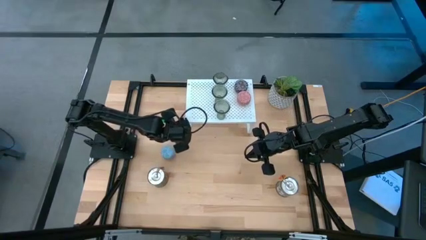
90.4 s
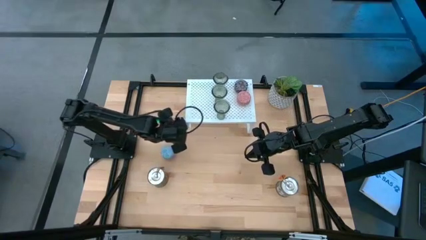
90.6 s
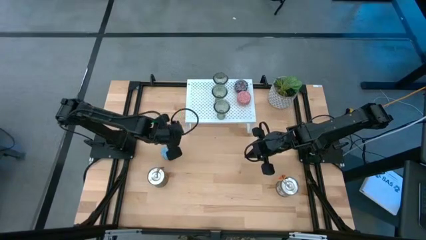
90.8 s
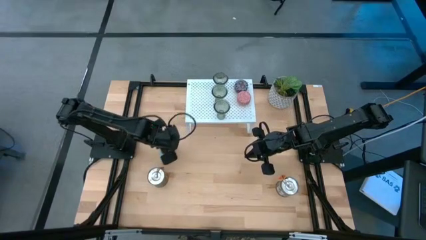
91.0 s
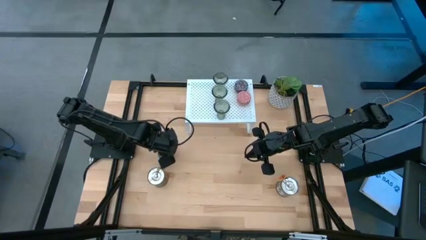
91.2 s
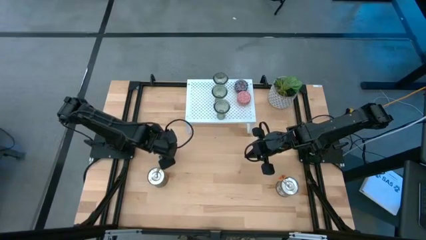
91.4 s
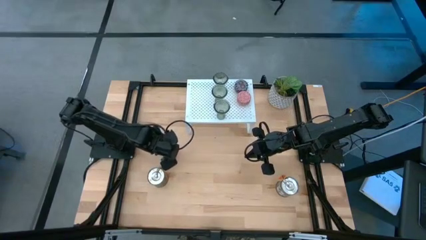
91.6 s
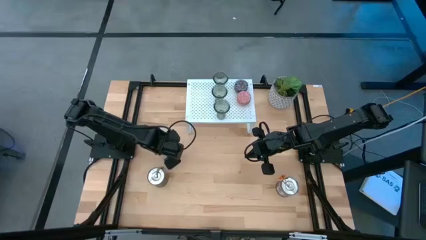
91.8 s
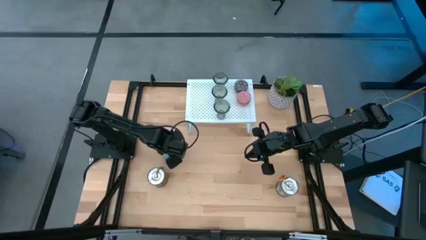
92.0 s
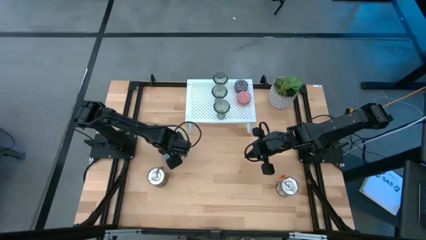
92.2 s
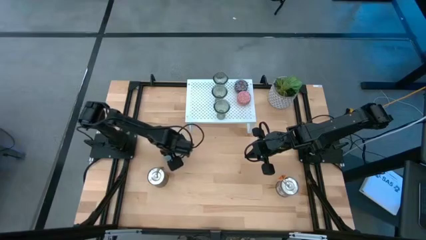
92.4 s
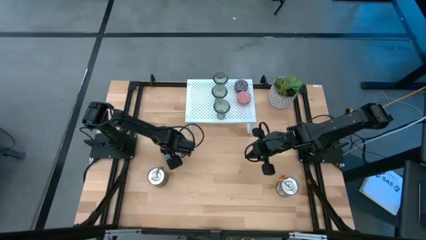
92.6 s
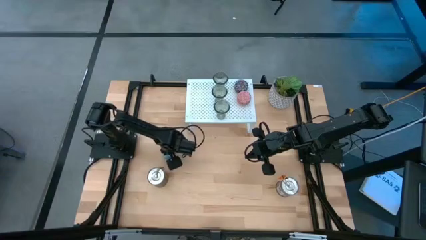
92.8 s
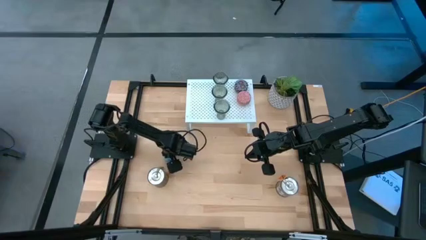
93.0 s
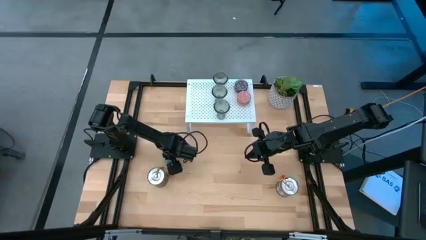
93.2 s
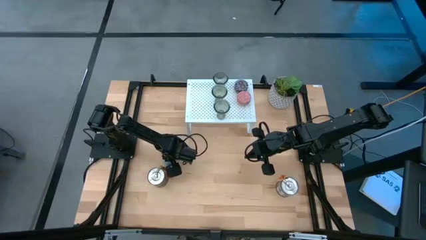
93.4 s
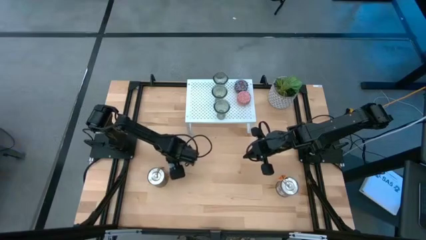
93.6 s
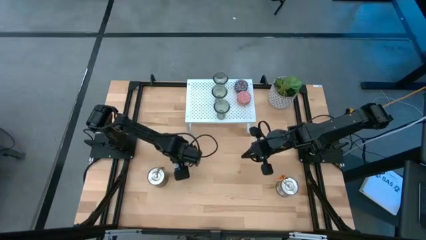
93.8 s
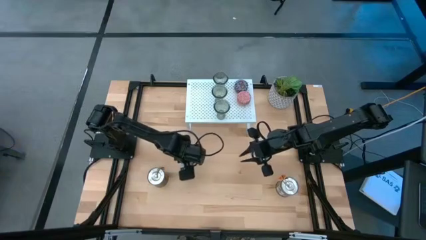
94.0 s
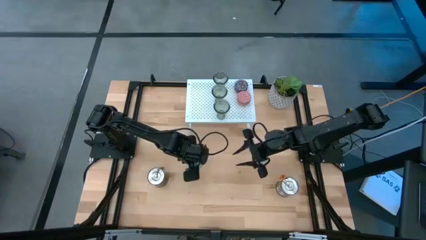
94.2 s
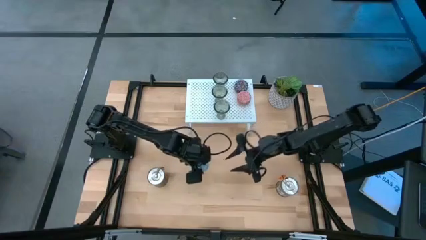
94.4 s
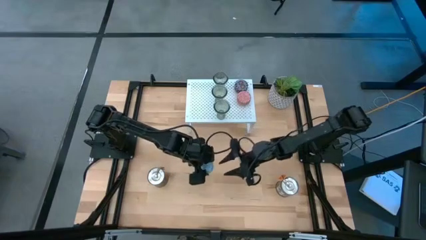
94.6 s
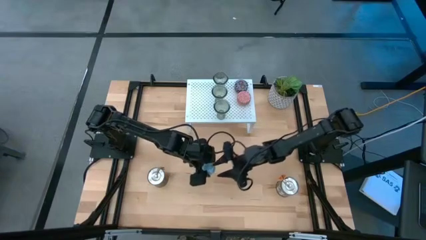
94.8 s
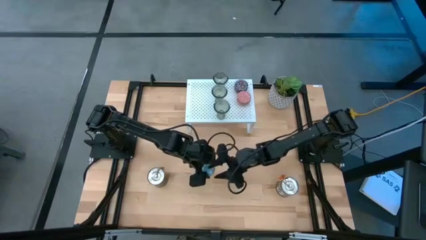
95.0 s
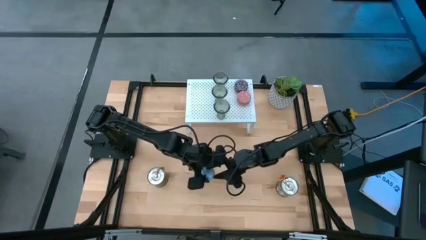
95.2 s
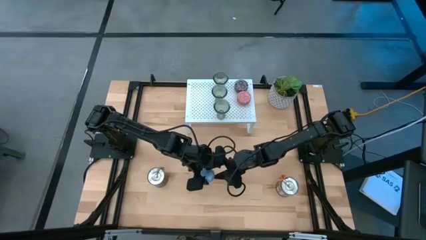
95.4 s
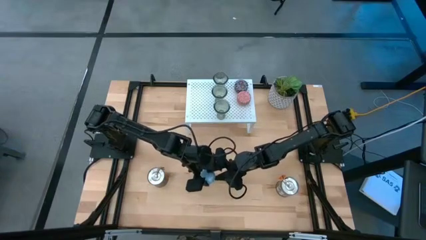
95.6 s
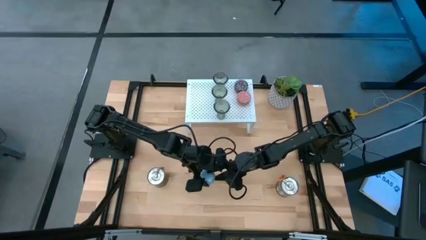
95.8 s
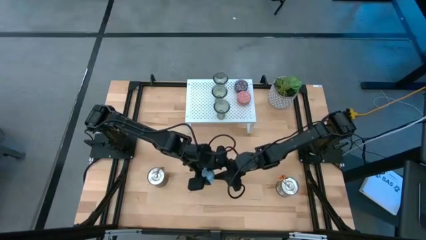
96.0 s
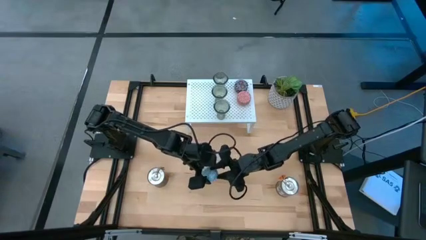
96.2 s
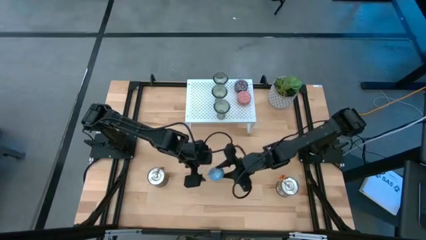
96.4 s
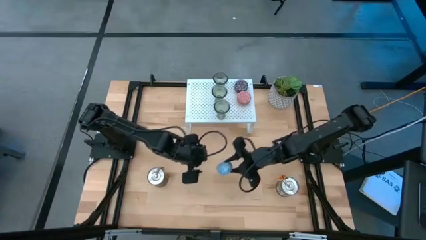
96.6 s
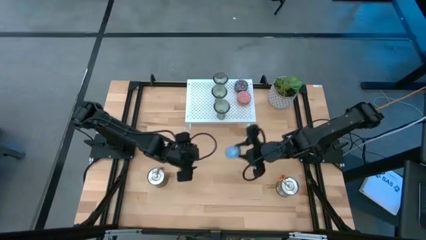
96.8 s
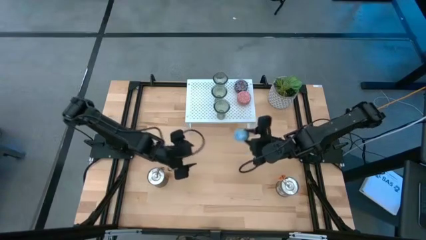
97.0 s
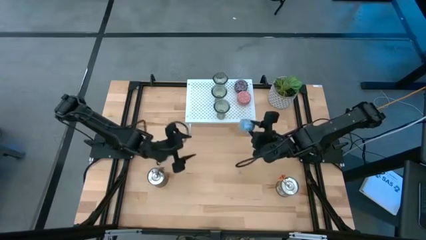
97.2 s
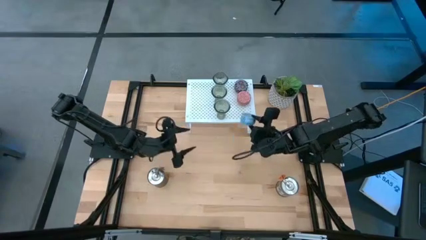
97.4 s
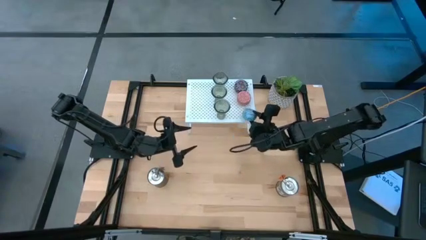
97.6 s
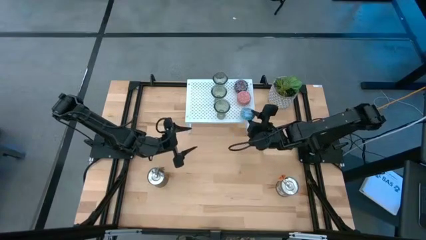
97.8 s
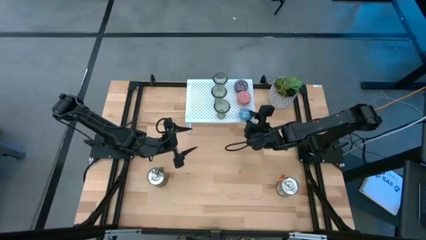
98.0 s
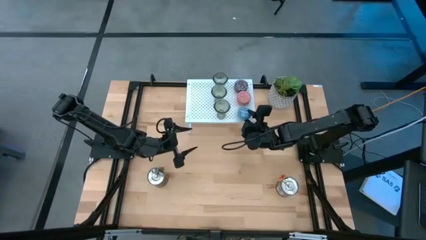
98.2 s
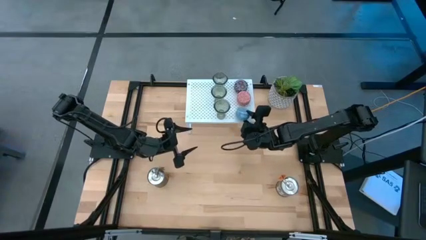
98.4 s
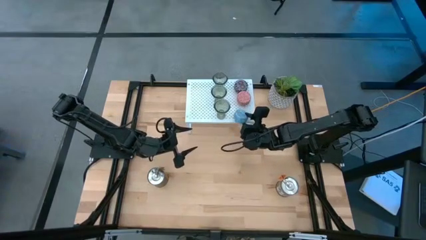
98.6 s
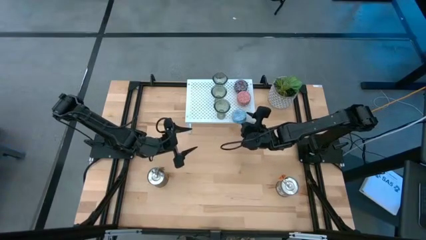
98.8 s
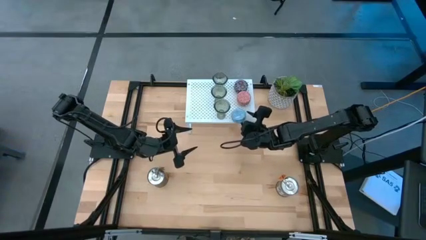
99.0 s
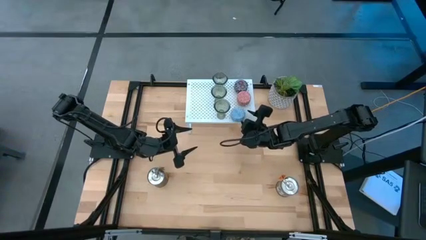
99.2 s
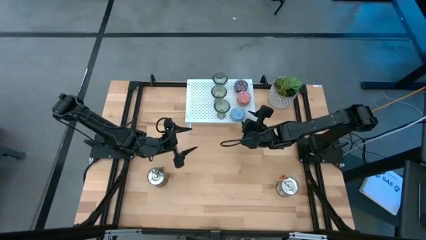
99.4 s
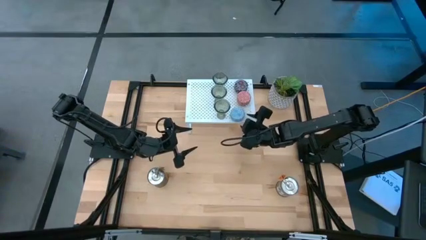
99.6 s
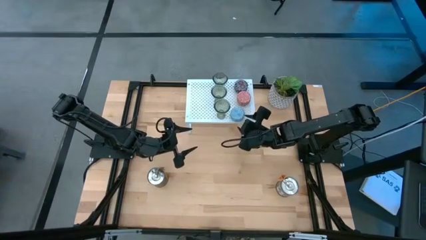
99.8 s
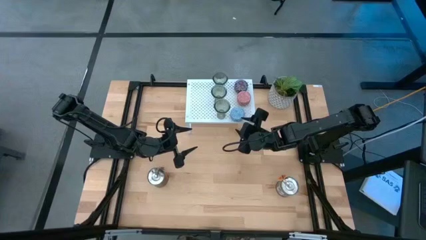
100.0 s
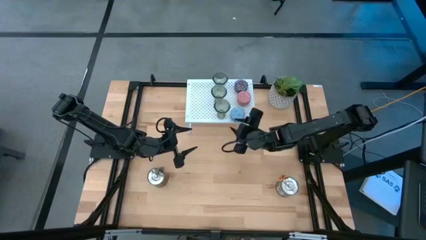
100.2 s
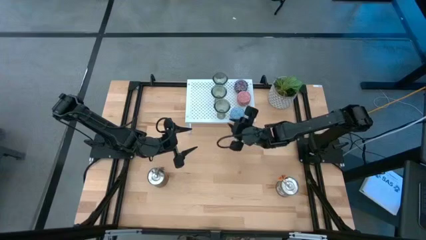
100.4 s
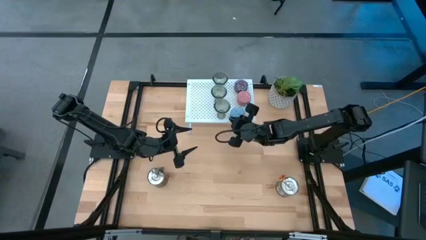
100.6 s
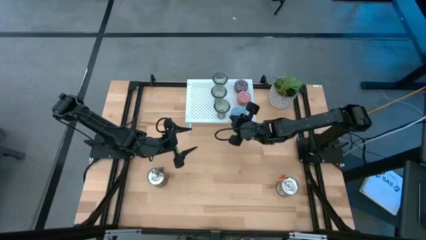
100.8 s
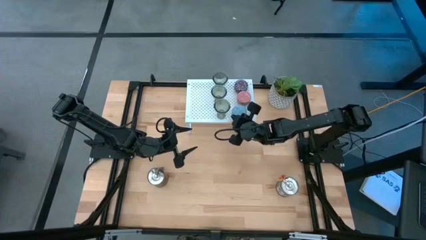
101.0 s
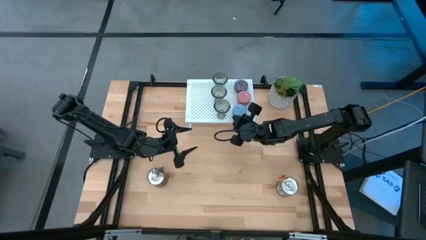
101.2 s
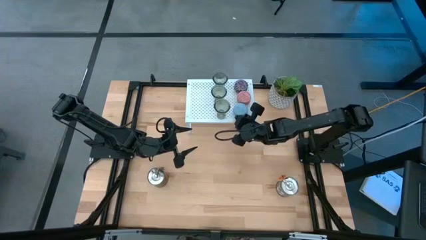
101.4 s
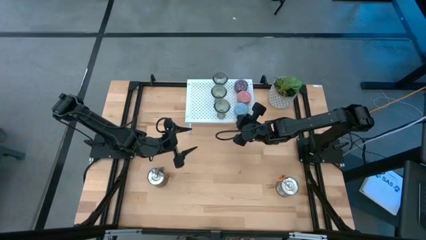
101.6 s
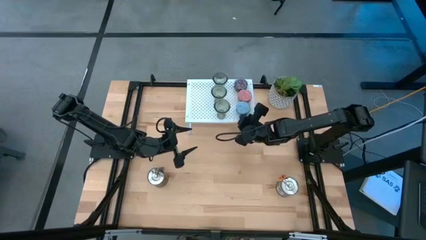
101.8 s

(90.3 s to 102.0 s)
Task: Pick & Place candle stick holders
Put the blue patterned scented candle on the shelf aligned with the other patterned scented candles

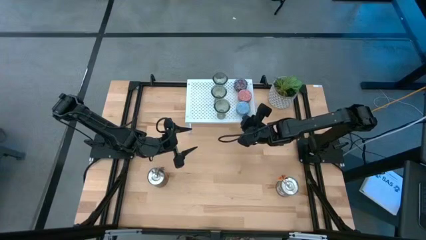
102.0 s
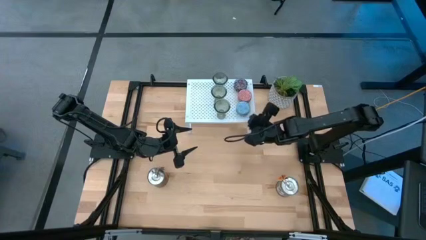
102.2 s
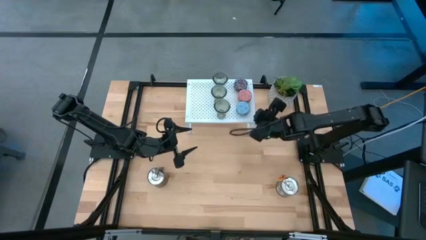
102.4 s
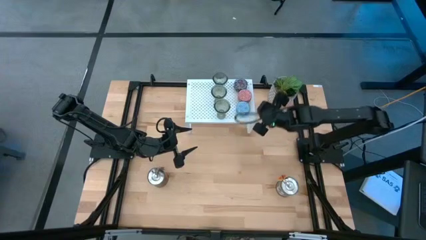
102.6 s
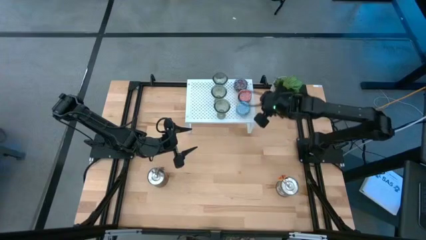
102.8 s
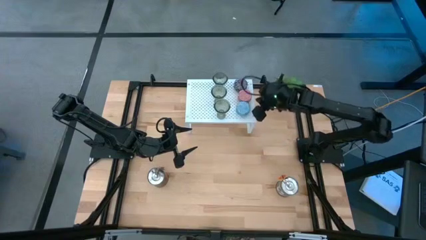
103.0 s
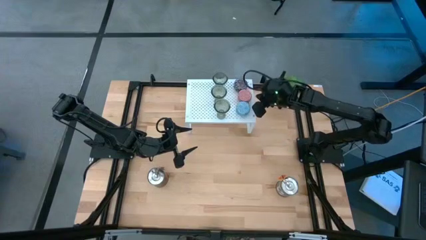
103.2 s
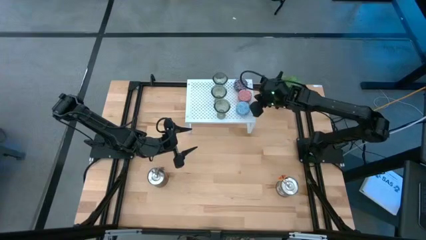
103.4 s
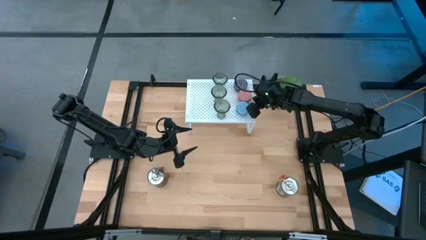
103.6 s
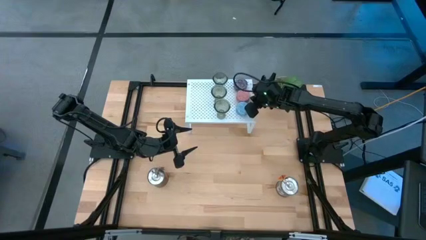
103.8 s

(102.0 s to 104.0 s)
Adjust the red patterned scented candle on the shelf
